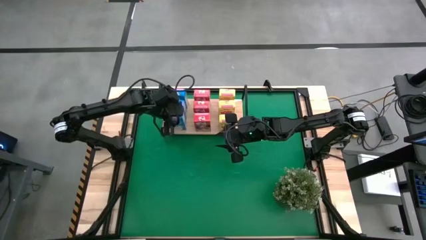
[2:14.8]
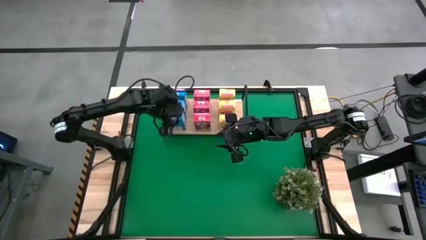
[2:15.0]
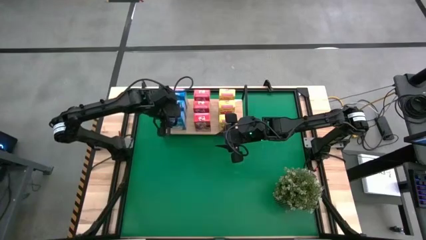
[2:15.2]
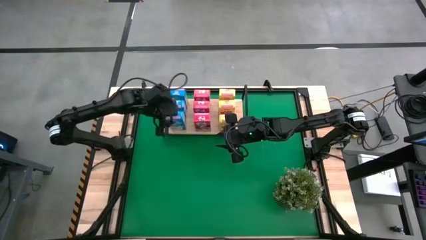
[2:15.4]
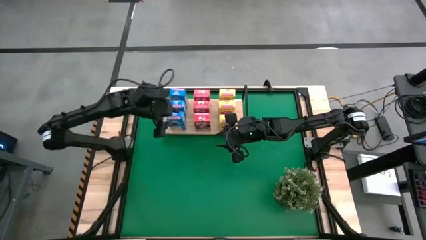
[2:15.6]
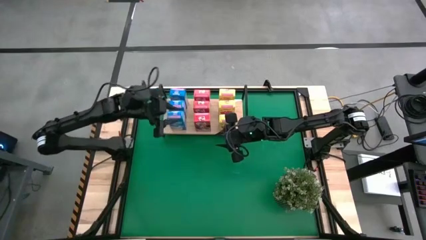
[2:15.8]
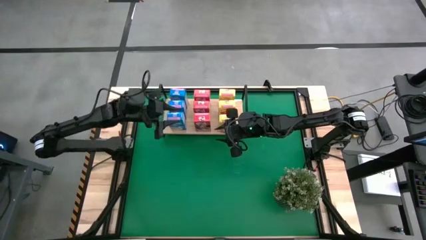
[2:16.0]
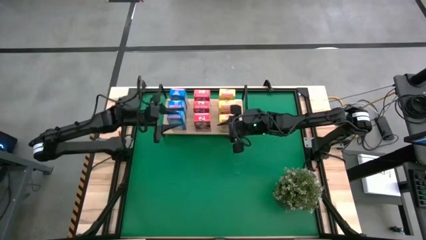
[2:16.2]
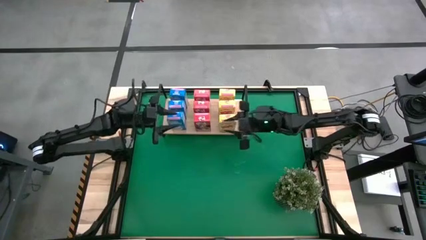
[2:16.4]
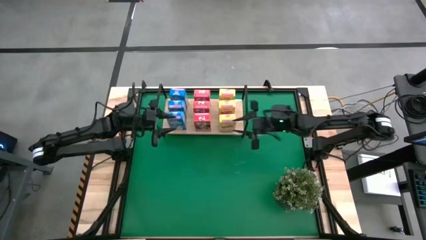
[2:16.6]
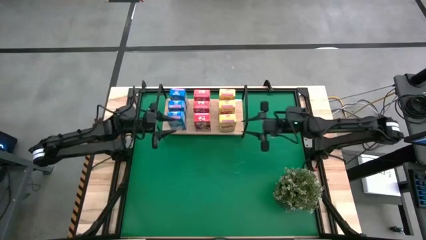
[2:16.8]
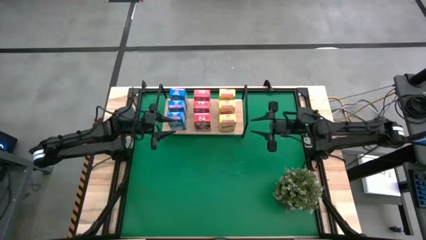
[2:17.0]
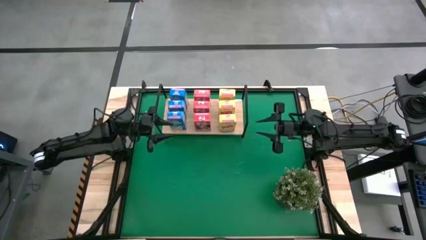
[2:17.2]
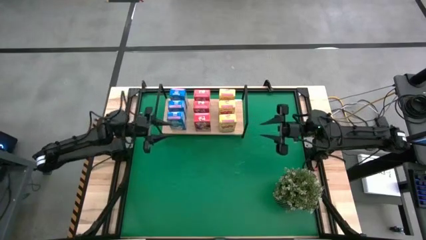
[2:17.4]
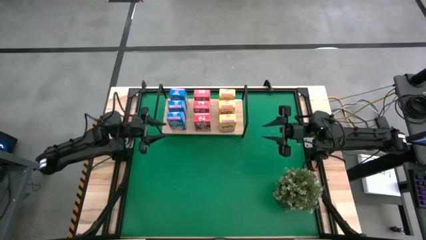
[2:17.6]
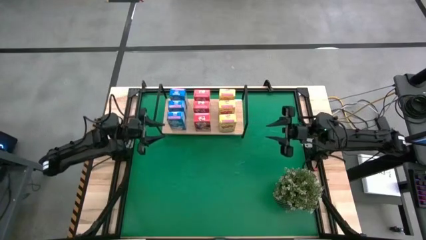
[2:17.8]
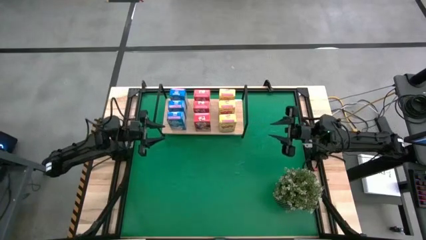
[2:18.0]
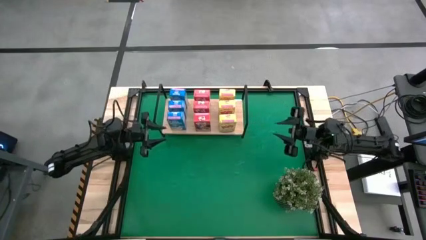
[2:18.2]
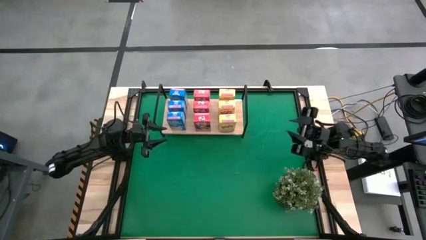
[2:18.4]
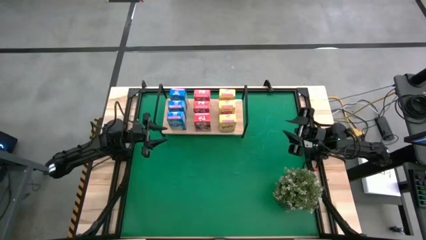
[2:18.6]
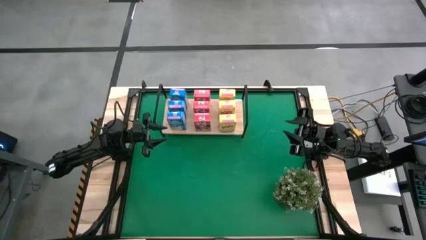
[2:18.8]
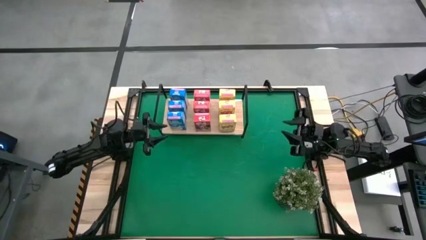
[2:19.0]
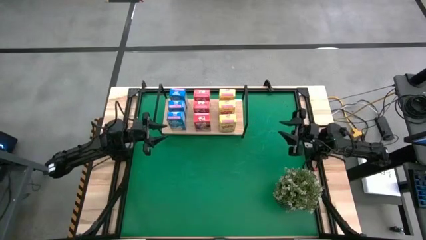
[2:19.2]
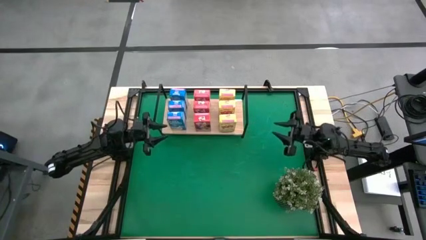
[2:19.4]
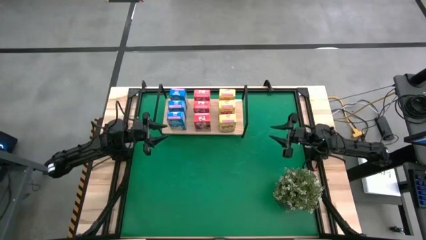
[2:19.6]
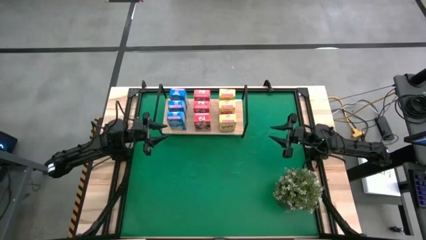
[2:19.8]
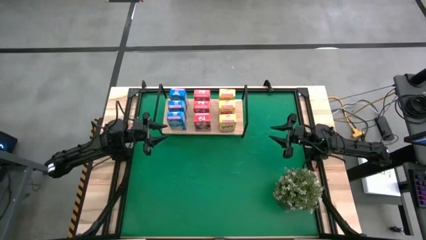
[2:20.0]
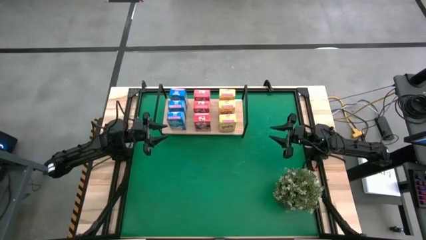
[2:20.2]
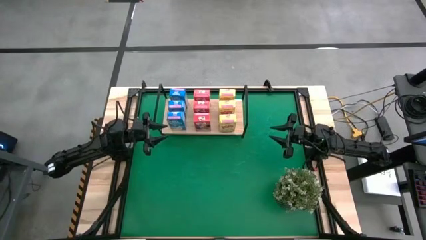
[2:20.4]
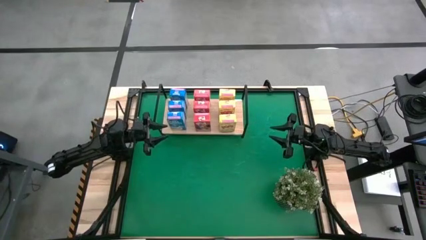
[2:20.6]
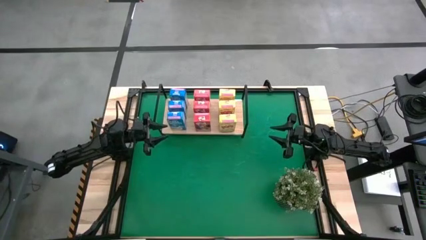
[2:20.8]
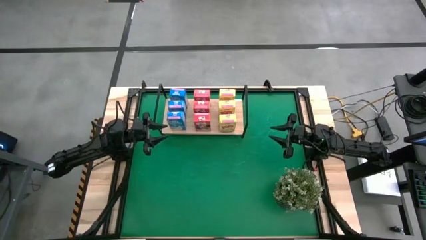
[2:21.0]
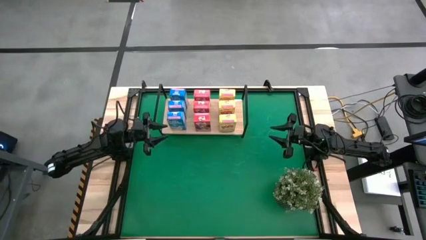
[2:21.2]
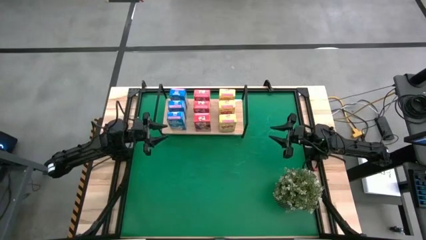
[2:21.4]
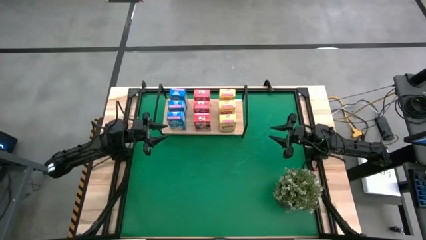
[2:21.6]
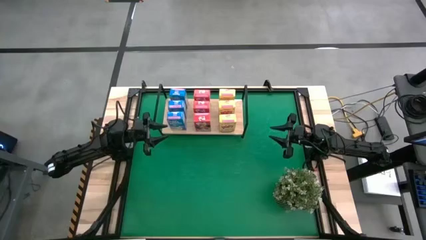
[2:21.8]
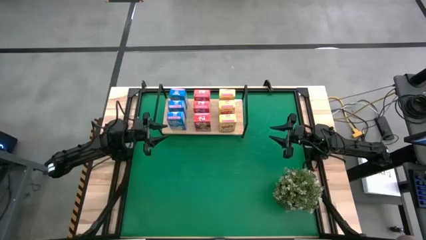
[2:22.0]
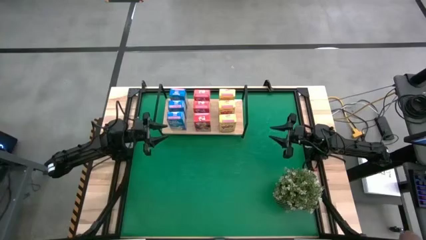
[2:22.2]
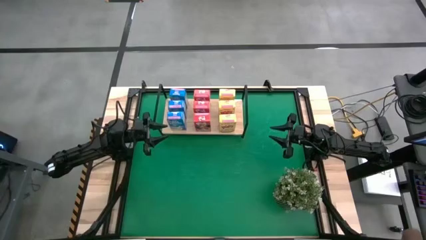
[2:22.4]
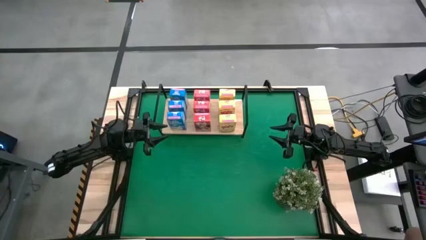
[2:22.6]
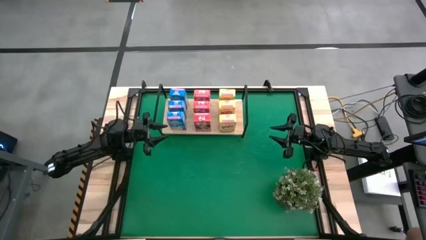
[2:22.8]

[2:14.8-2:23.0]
Task: Stack cereal on shelf
Return to Home Position

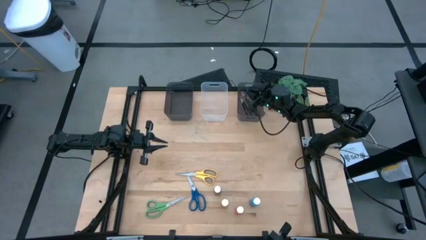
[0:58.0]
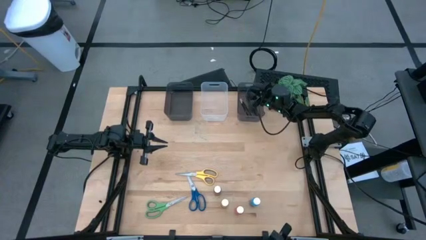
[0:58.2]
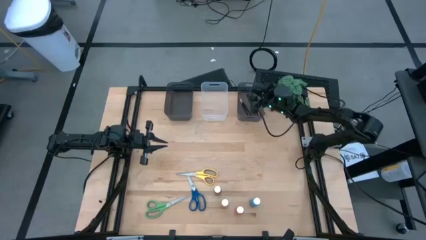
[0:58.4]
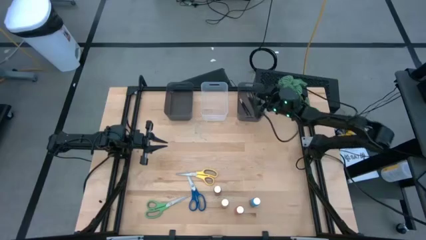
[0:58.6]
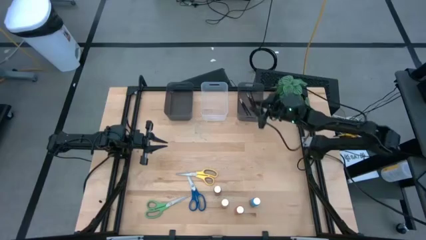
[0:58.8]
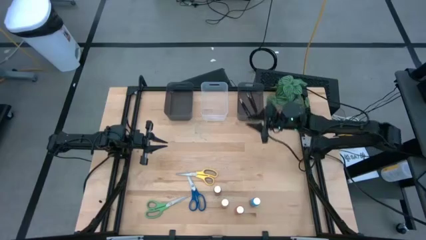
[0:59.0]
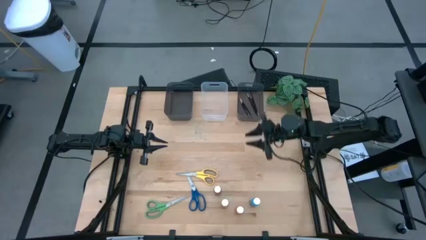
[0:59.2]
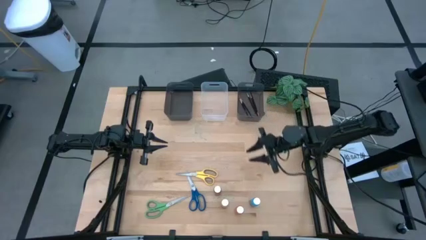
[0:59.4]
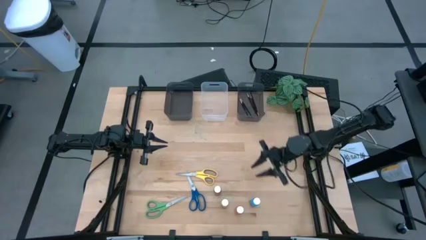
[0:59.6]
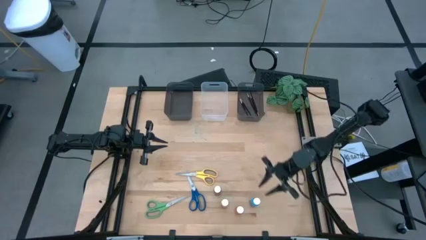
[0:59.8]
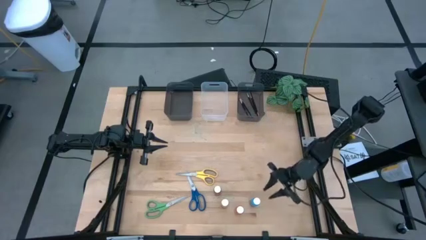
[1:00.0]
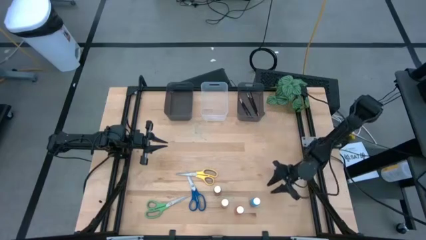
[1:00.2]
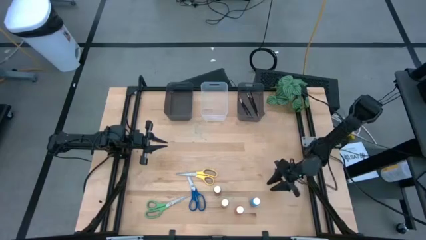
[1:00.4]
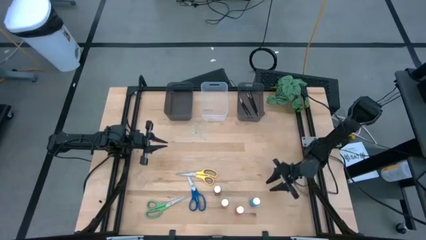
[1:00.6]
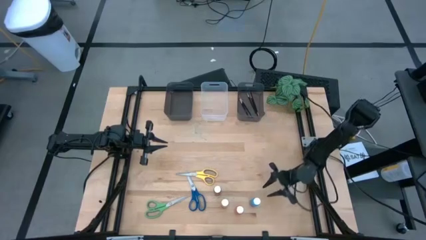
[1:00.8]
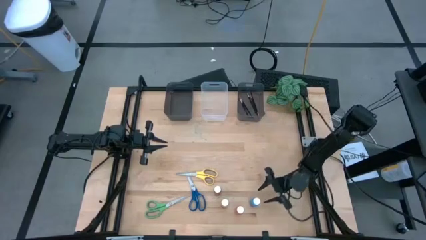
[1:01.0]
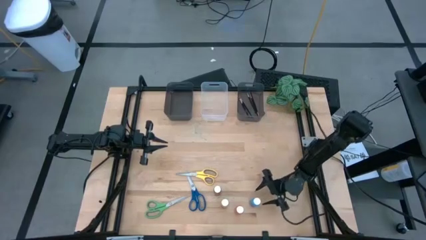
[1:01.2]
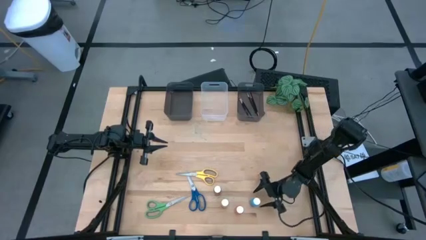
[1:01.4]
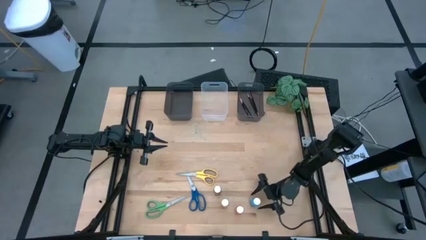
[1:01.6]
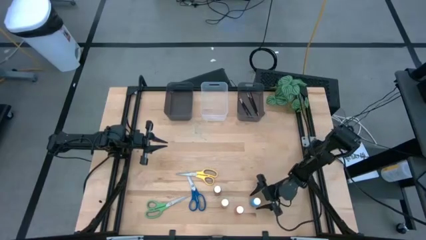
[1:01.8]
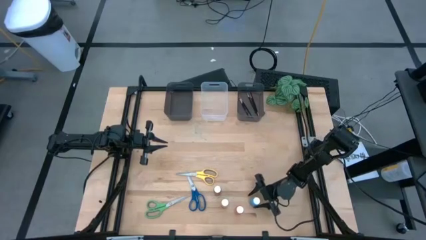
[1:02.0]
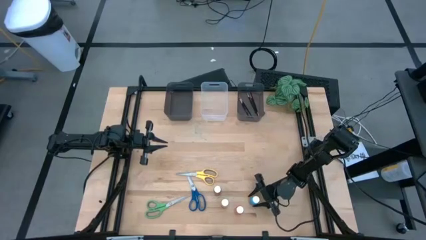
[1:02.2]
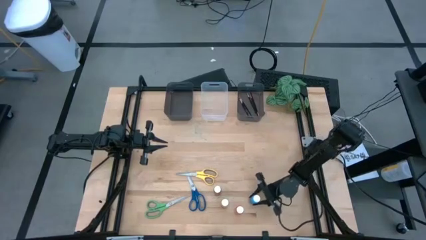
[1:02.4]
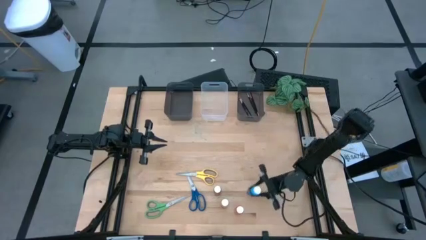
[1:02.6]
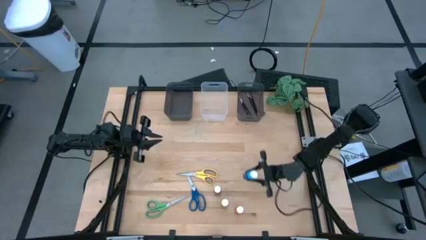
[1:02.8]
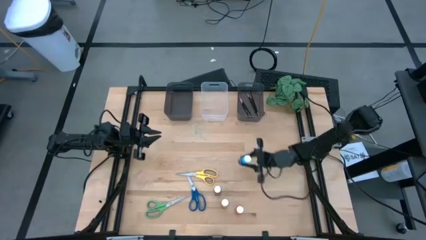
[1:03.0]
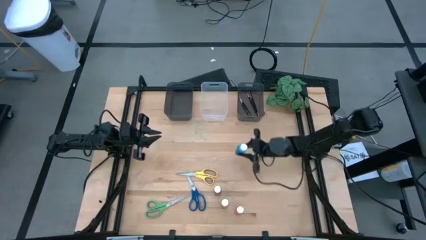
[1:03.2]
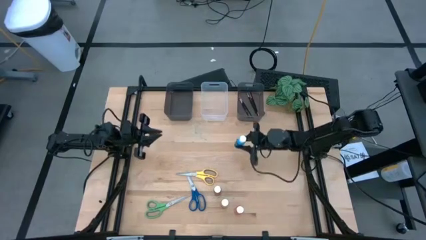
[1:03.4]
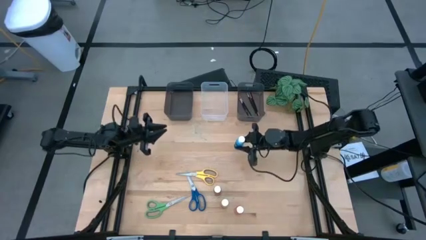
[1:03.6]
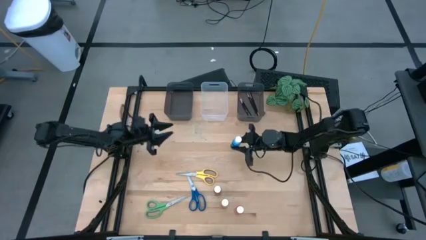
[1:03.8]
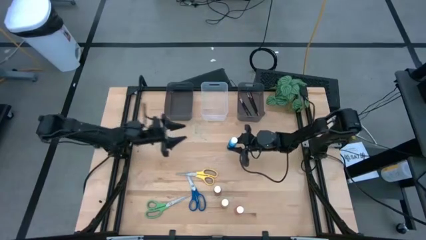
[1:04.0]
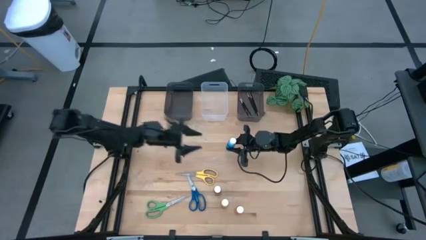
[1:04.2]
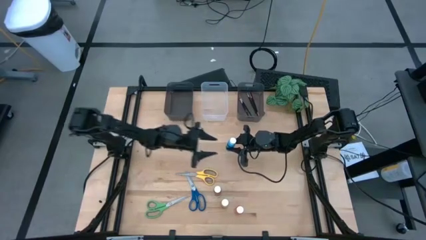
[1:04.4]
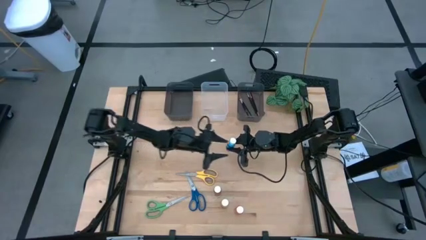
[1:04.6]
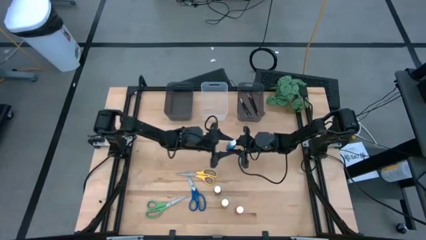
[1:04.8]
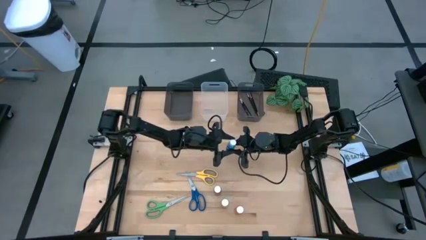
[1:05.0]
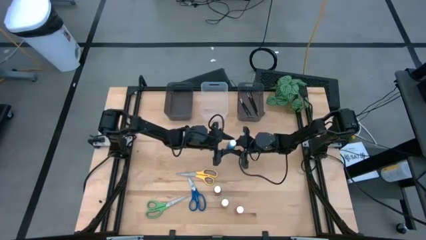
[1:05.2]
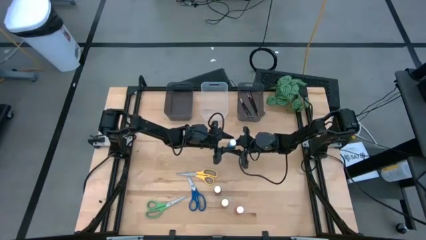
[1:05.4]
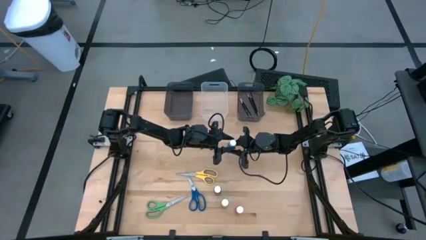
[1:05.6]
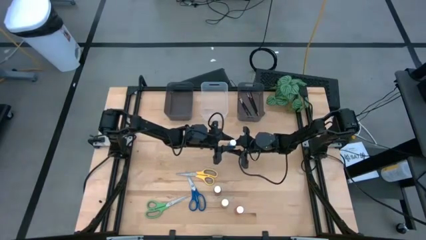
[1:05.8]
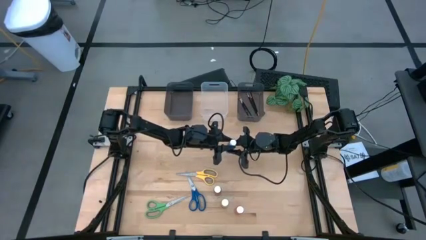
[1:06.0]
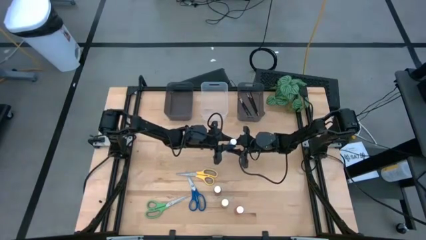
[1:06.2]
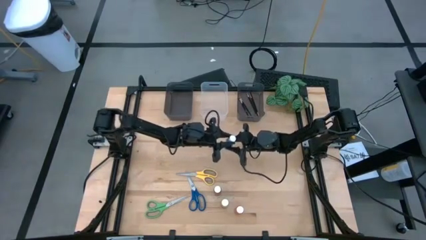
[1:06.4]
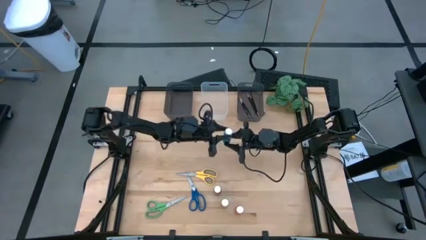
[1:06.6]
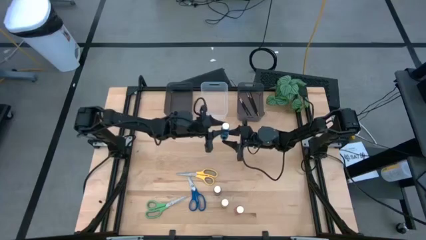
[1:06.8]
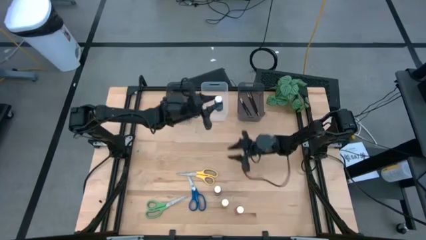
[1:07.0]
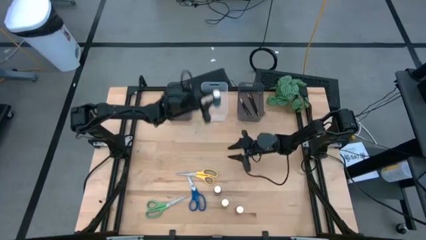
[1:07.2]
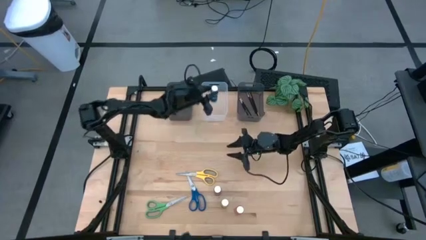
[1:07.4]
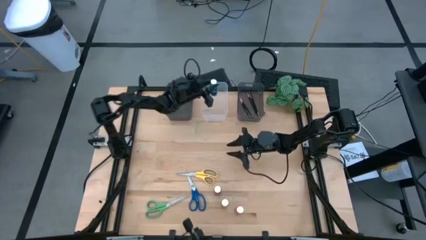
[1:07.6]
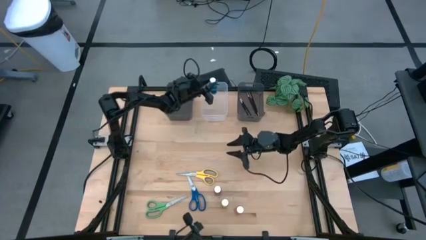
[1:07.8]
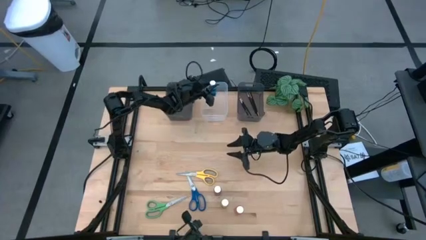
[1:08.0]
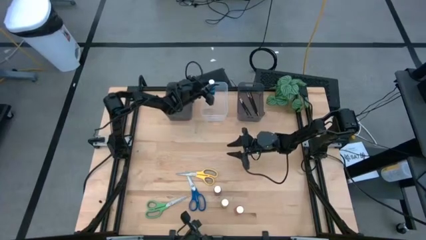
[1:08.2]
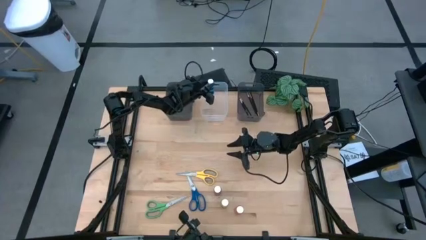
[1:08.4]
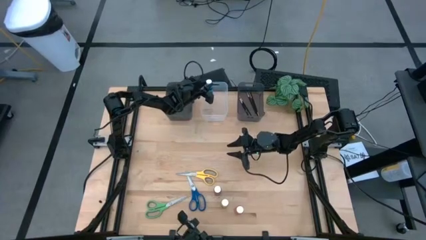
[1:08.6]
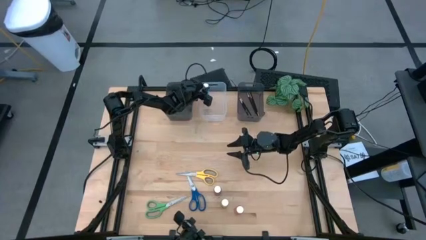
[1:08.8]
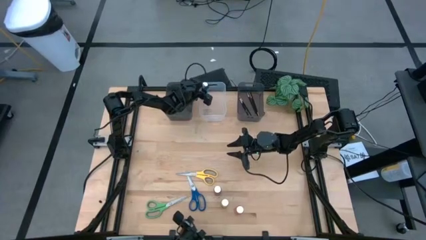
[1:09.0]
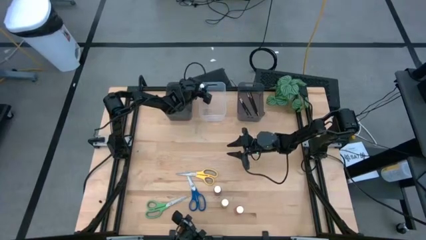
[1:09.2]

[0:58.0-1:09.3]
Task: Pick & Place Paint Supplies
Put the blue paint bottle into the transparent bin
